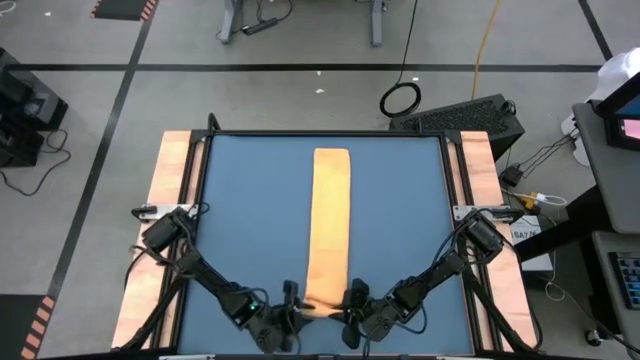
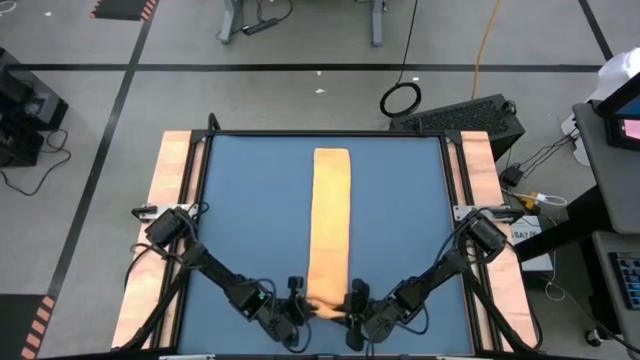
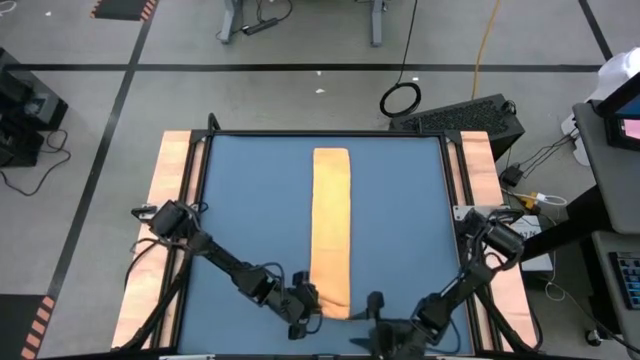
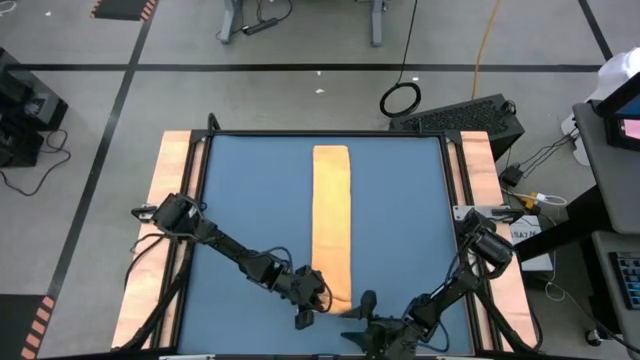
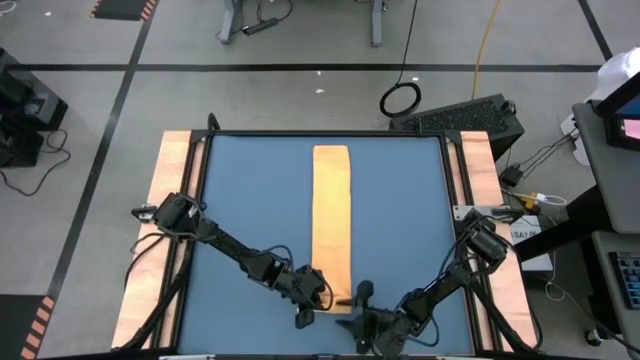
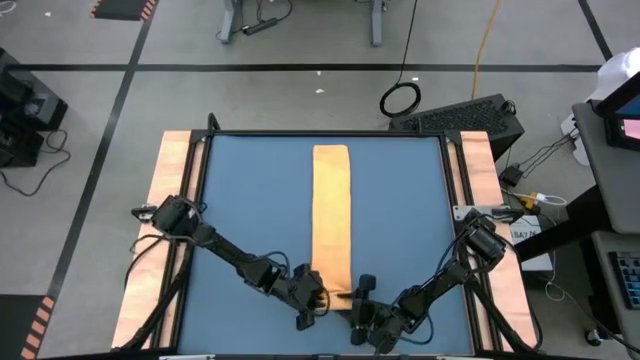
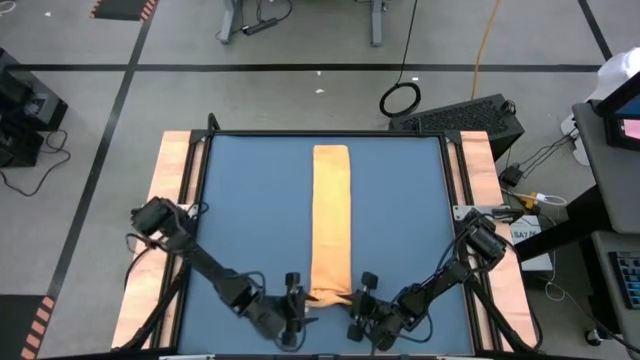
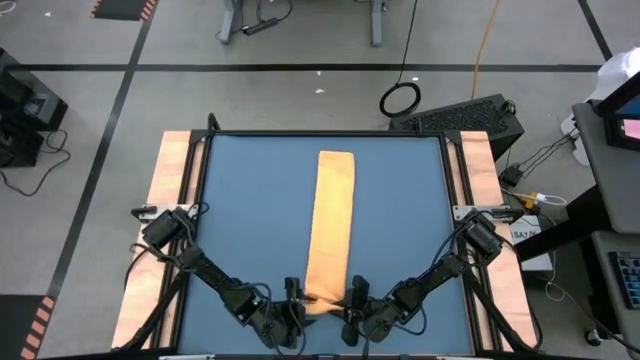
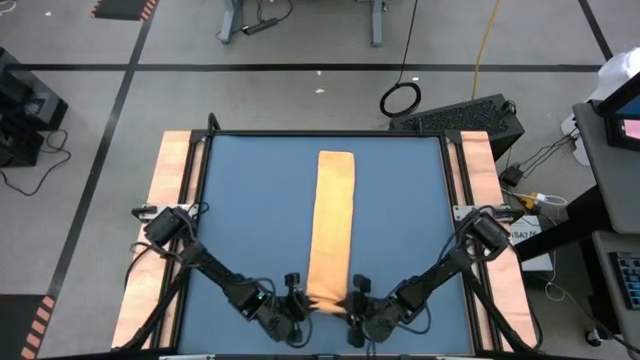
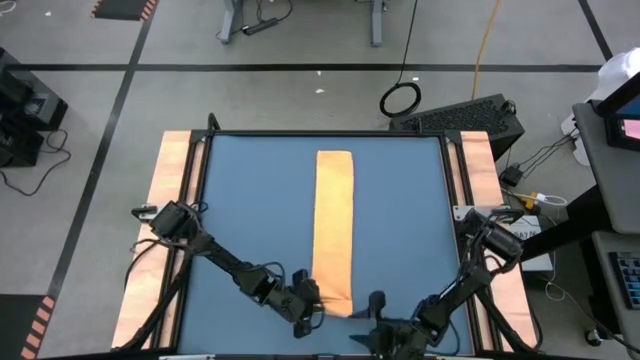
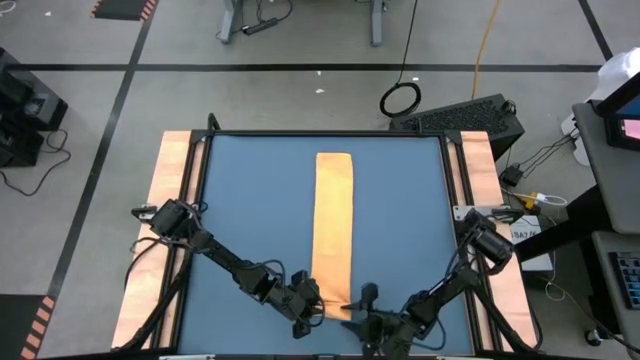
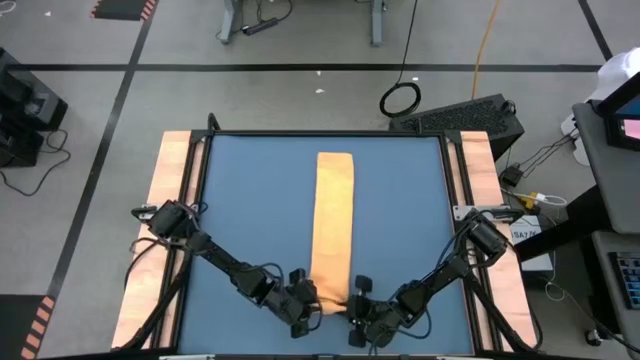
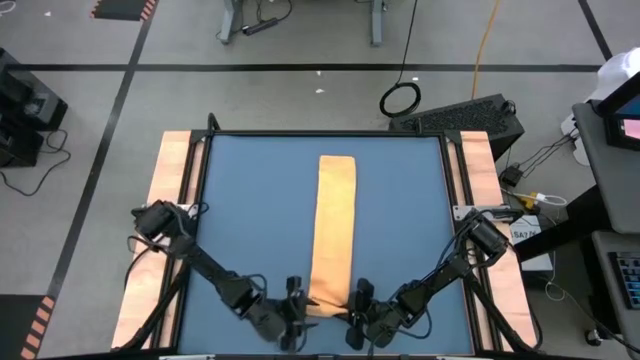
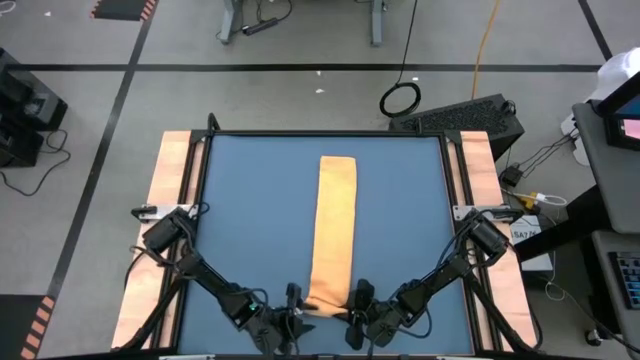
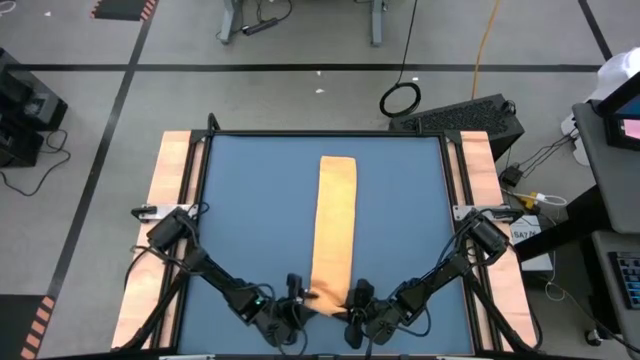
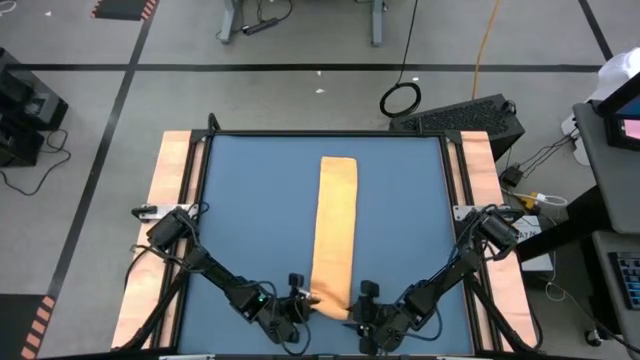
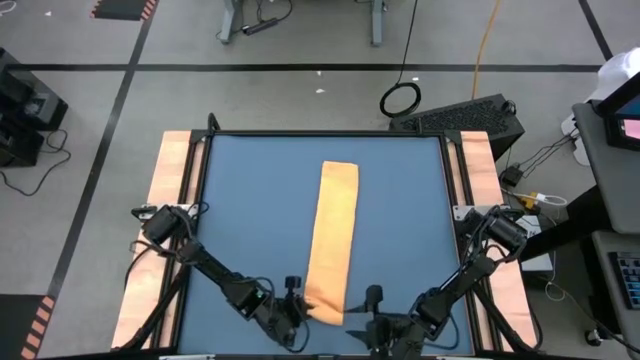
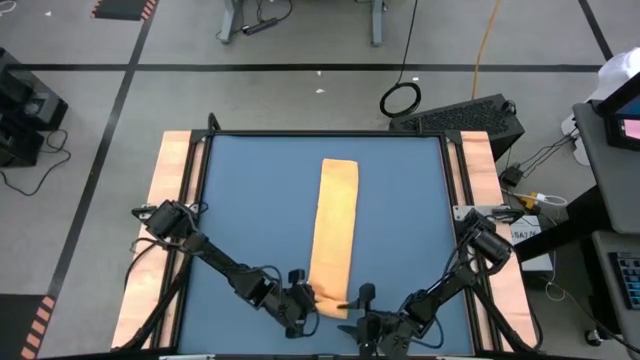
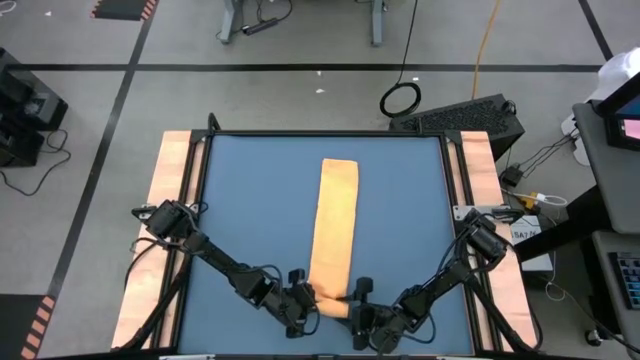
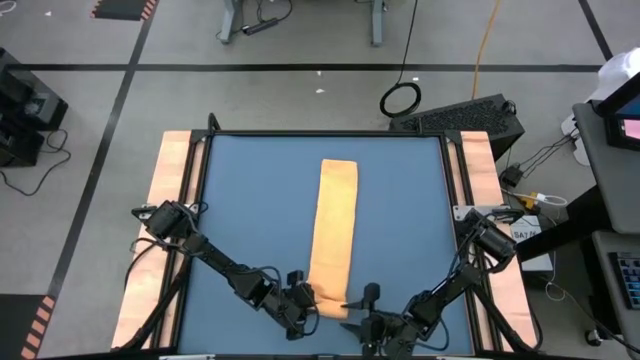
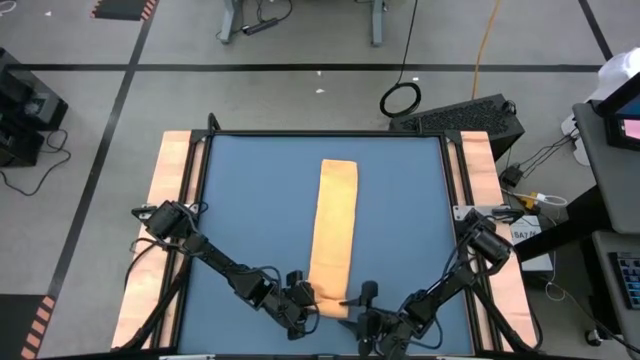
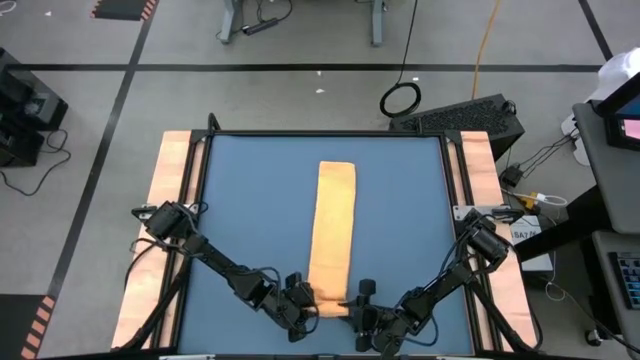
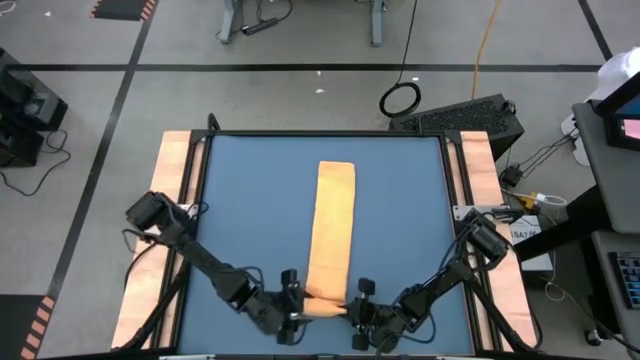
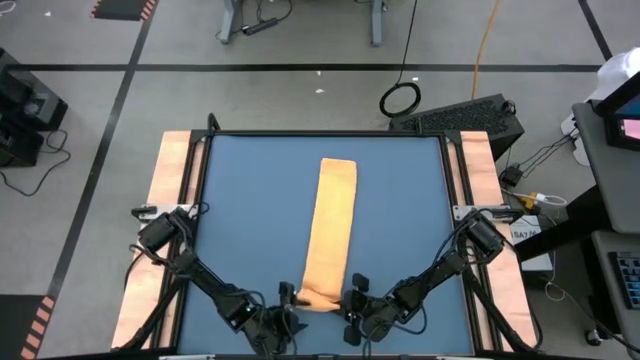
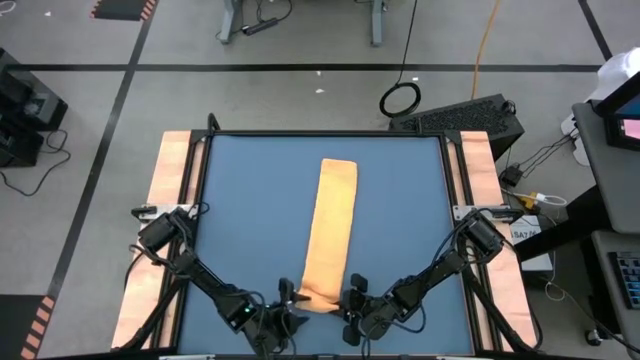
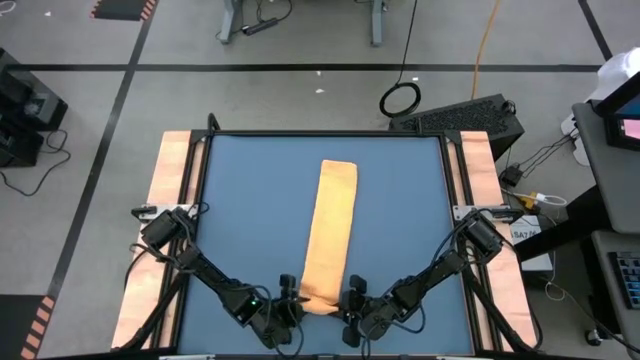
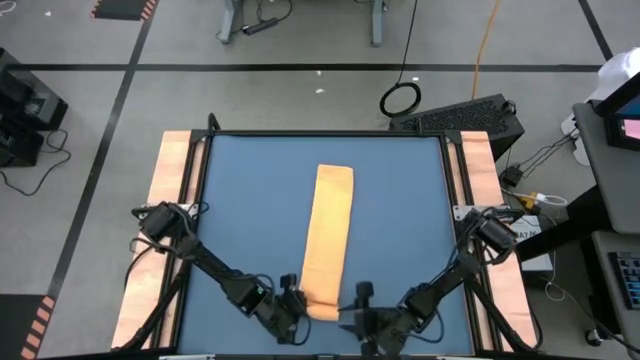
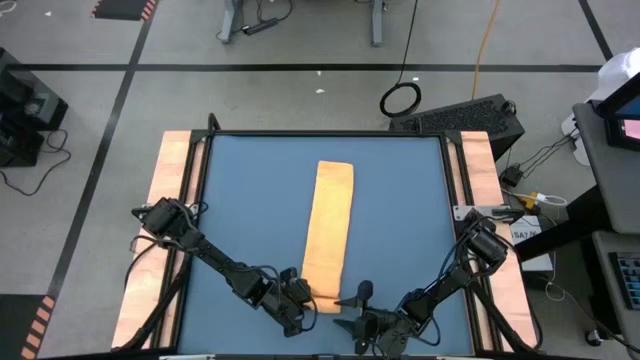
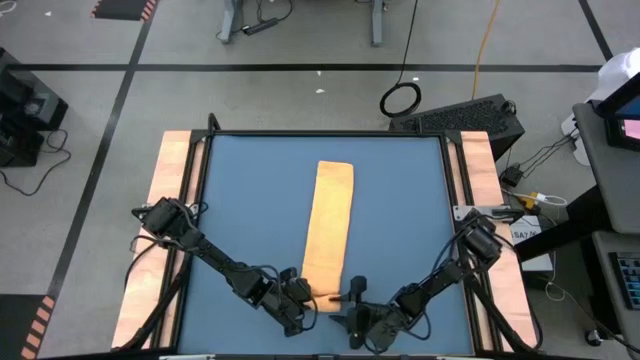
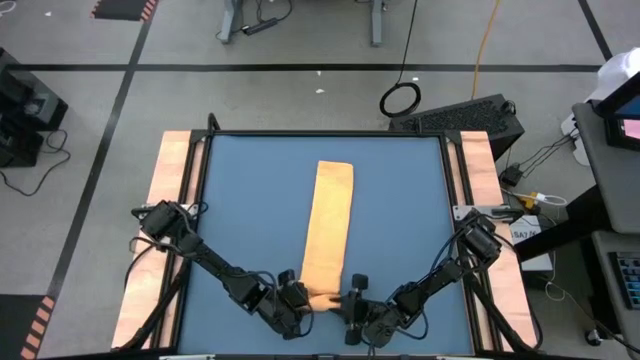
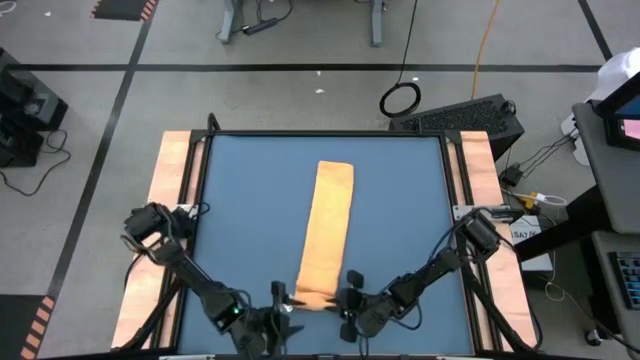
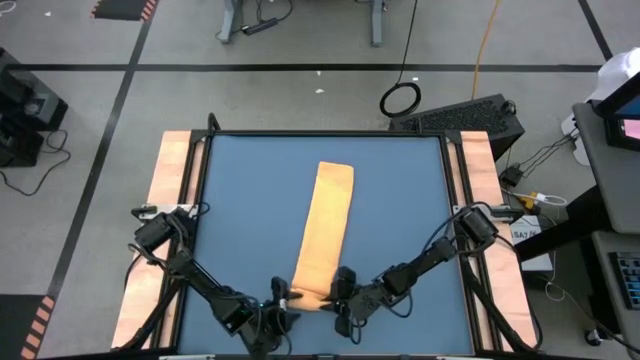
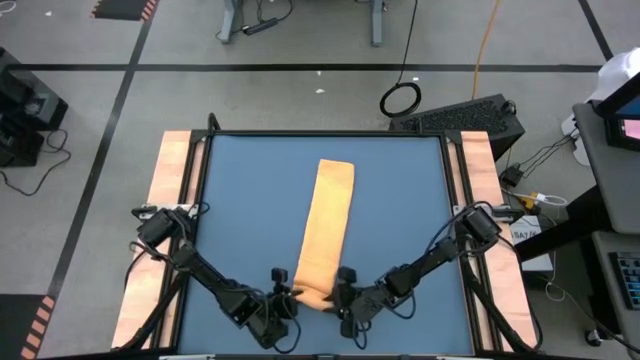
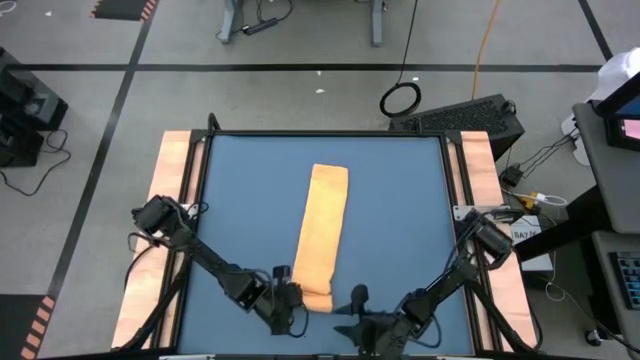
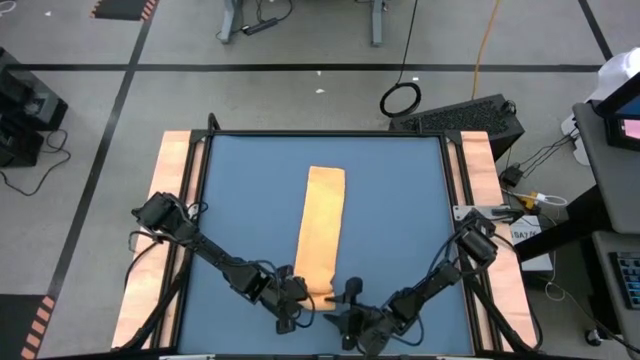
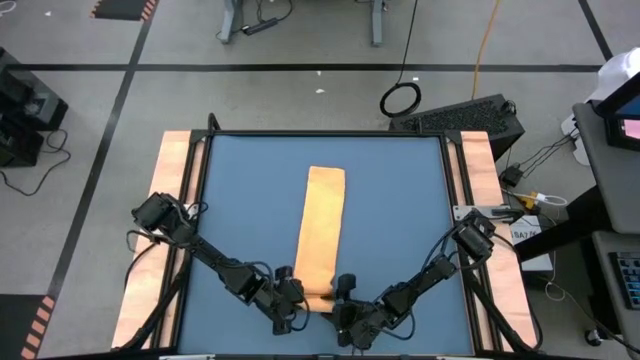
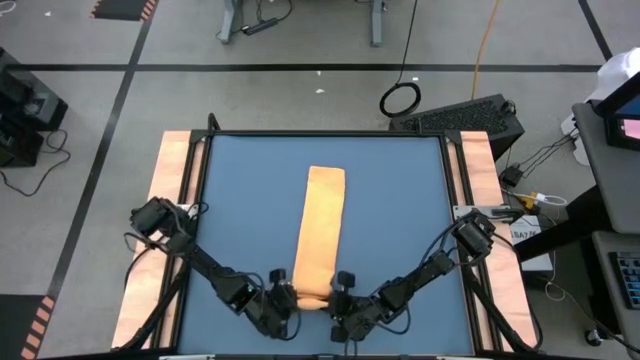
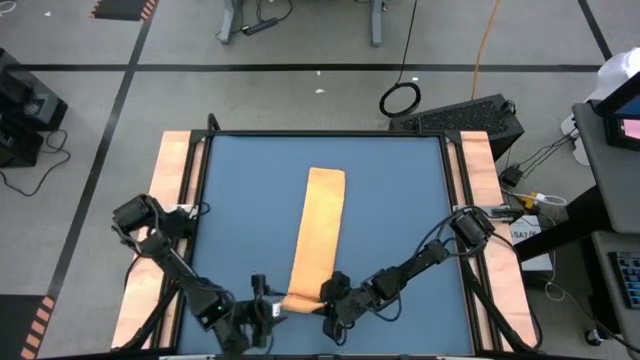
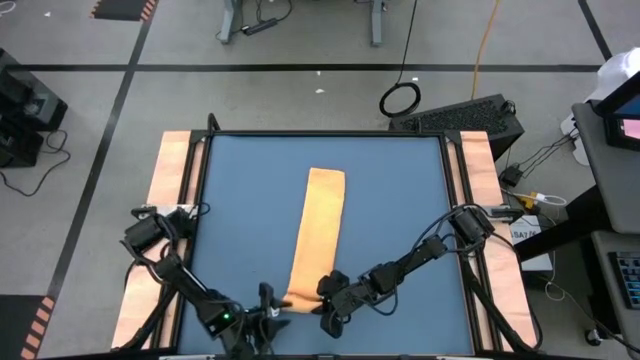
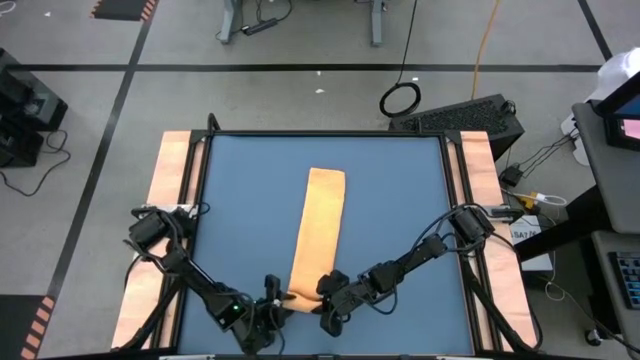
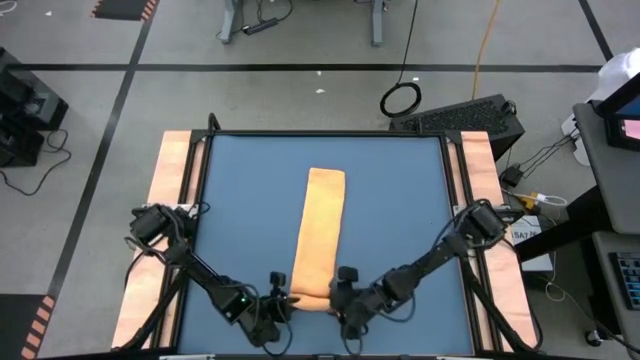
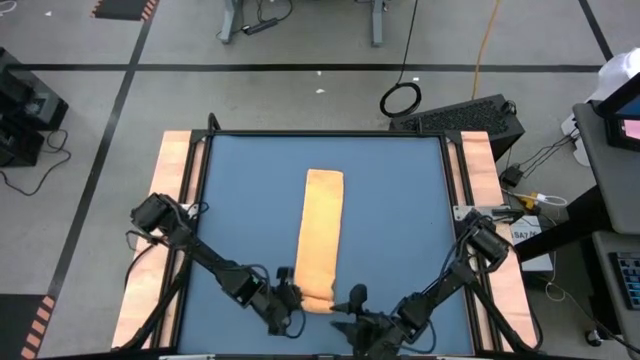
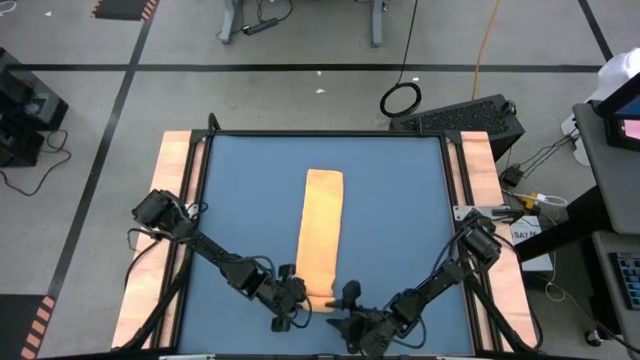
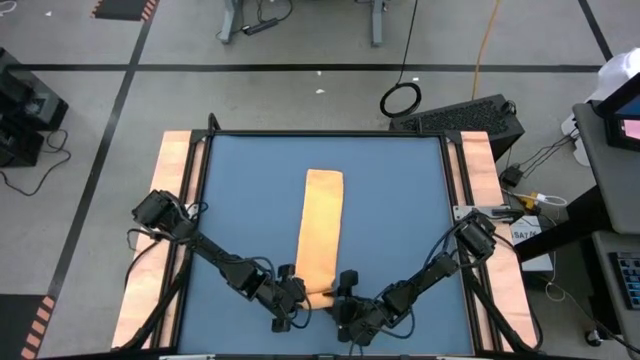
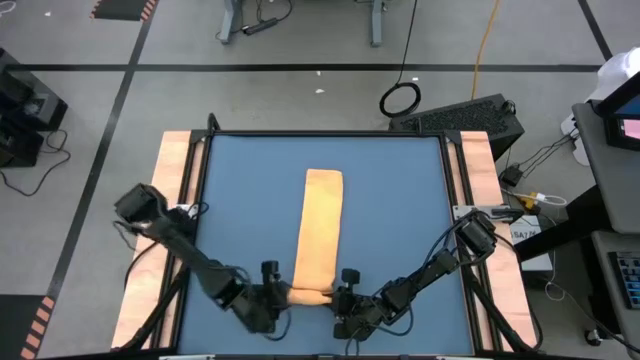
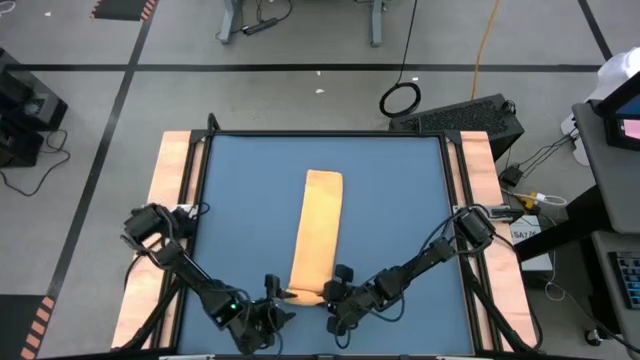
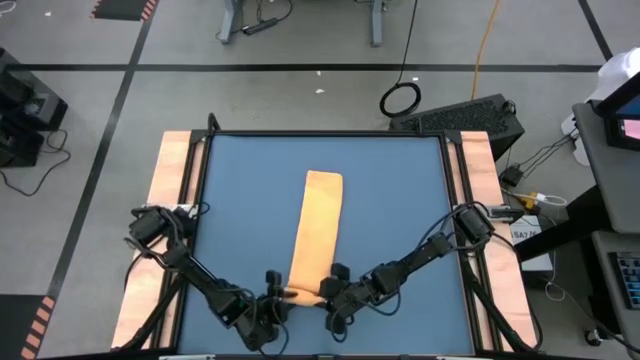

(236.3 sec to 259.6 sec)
Task: Roll towel into tight, uniform cylinder
Roll the orange microfiber cloth
